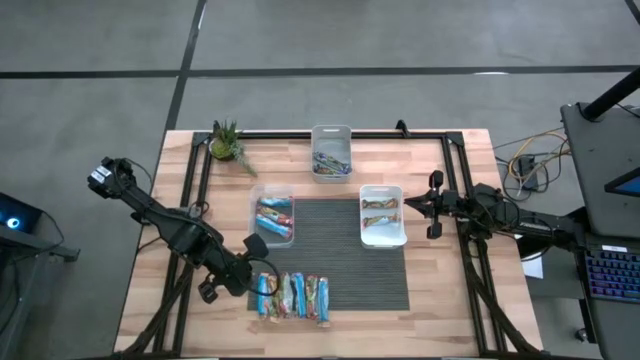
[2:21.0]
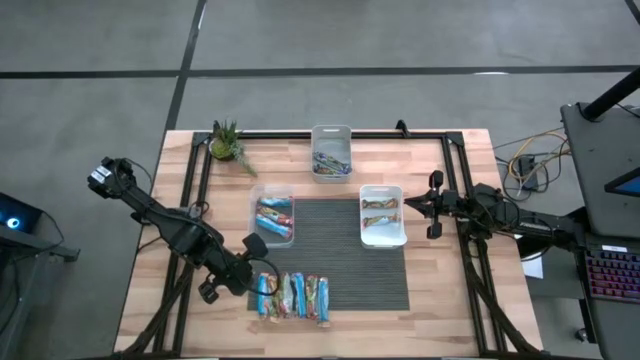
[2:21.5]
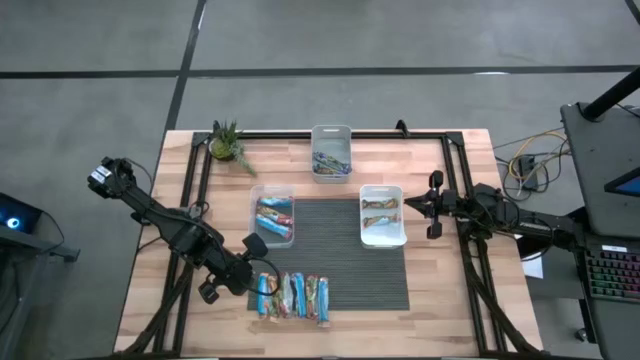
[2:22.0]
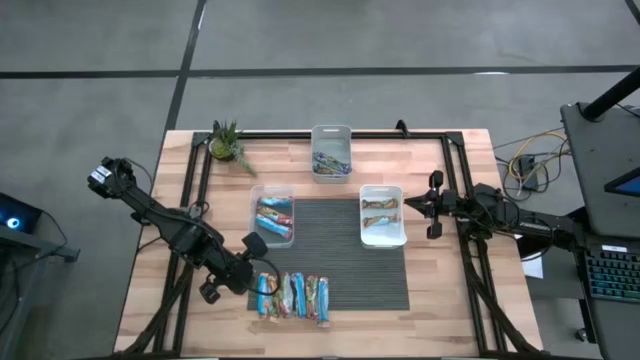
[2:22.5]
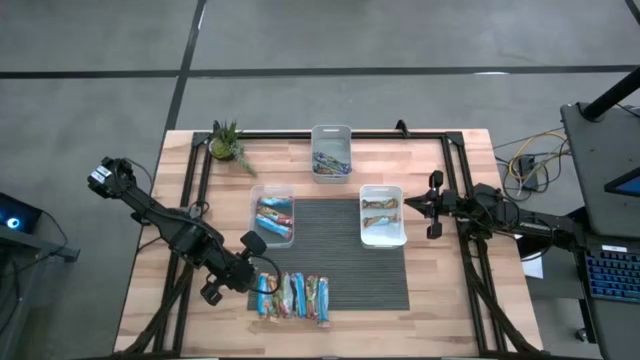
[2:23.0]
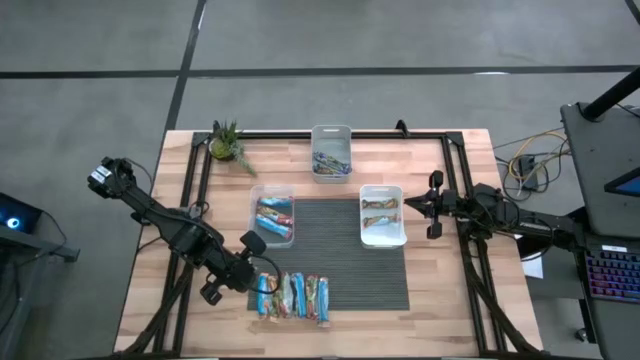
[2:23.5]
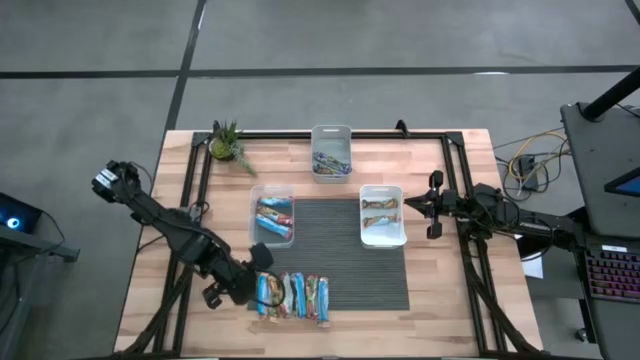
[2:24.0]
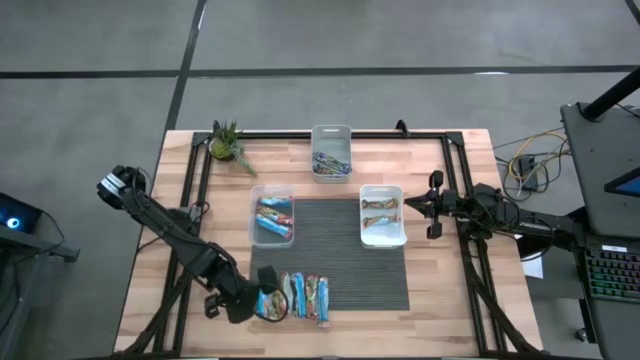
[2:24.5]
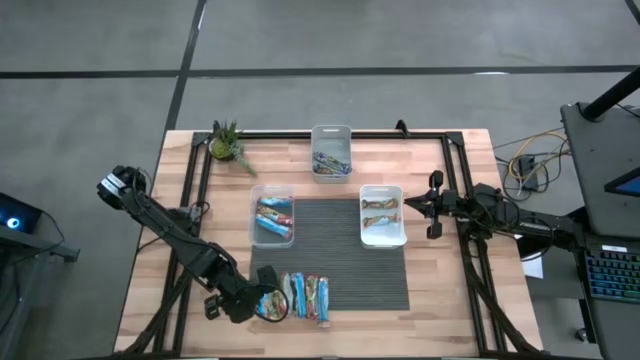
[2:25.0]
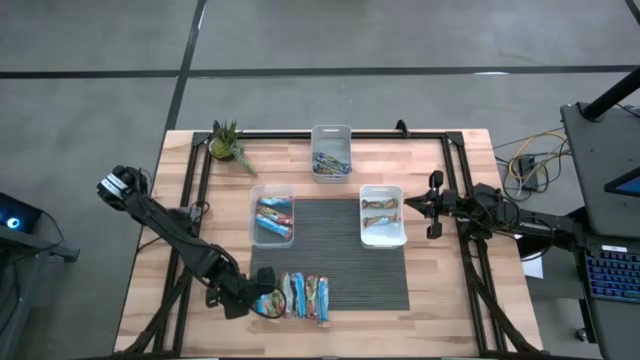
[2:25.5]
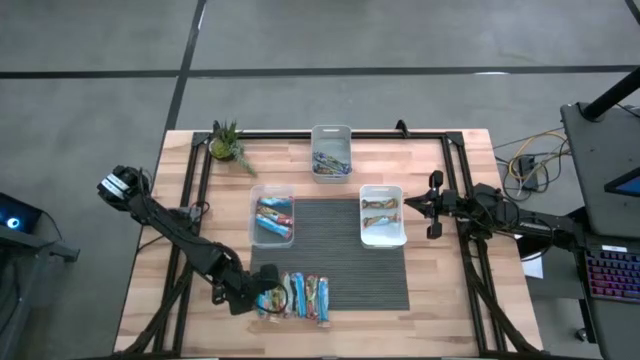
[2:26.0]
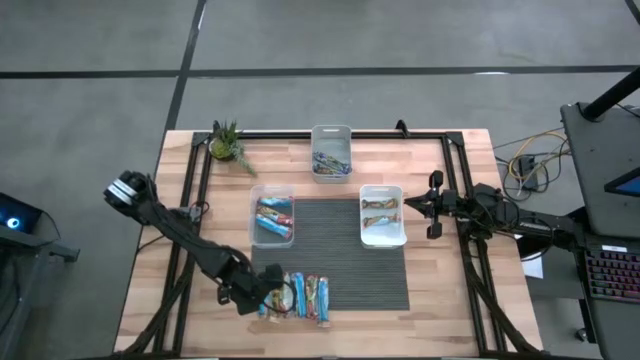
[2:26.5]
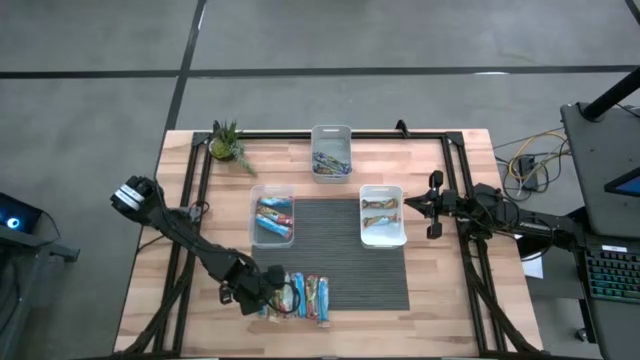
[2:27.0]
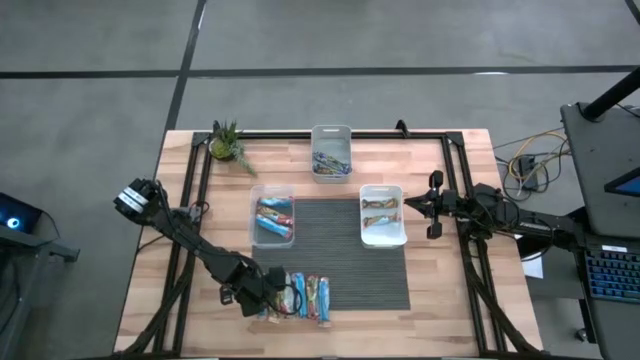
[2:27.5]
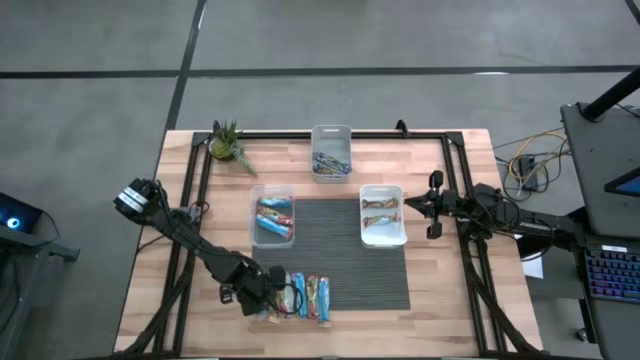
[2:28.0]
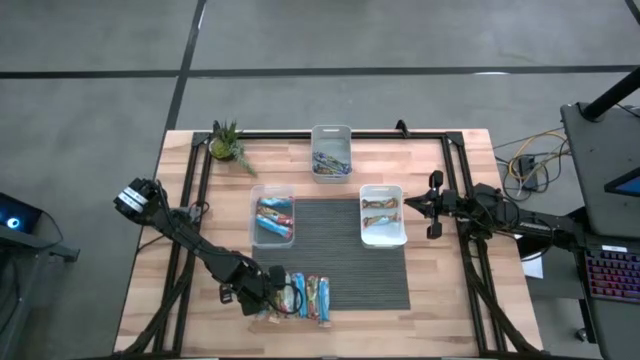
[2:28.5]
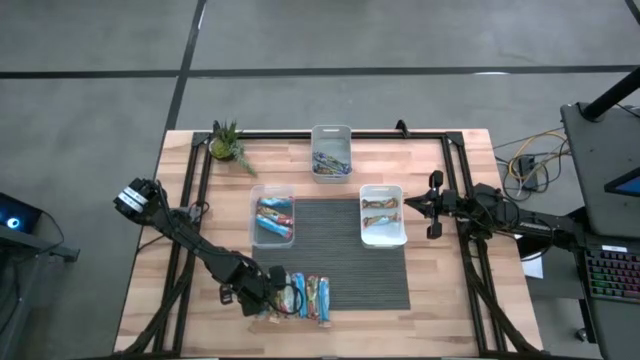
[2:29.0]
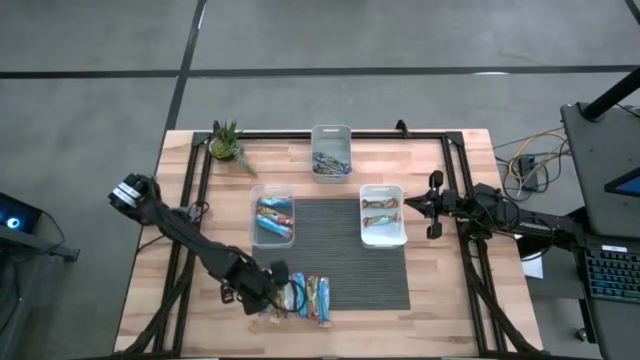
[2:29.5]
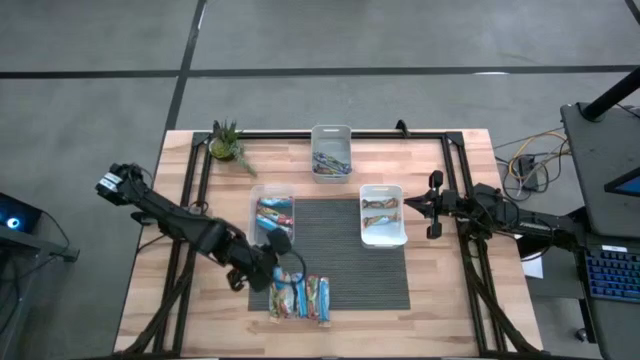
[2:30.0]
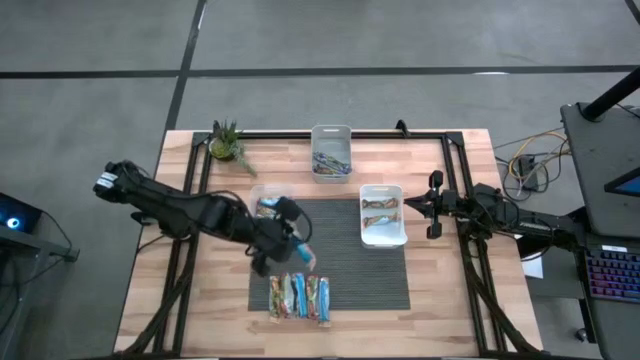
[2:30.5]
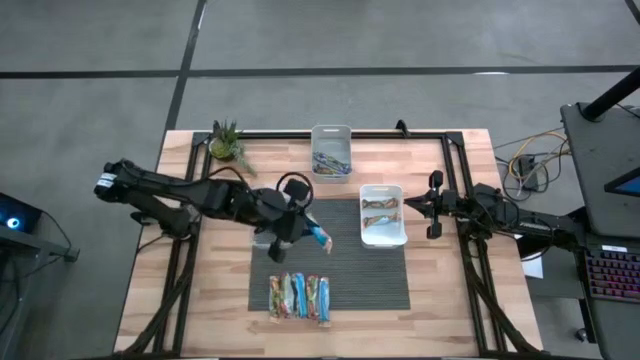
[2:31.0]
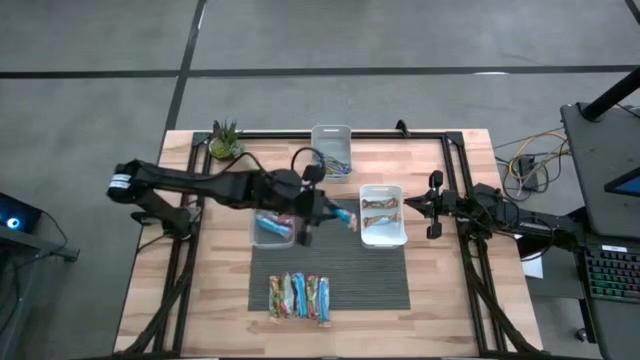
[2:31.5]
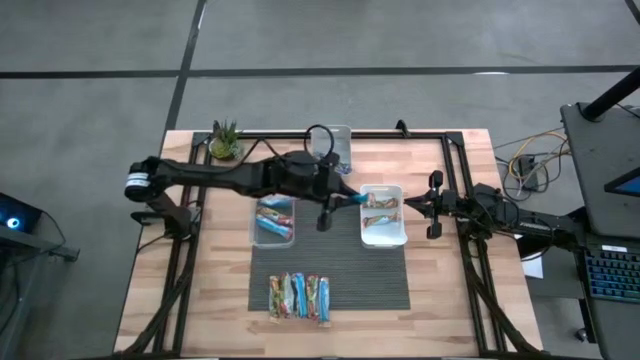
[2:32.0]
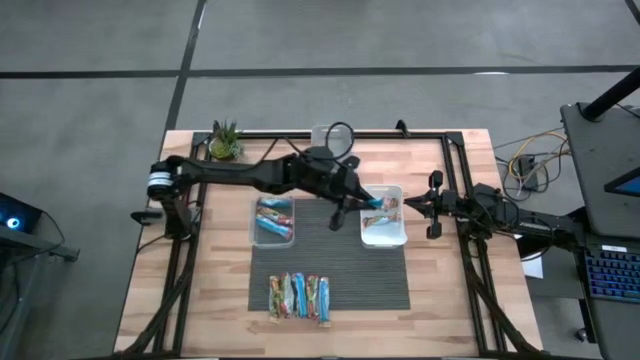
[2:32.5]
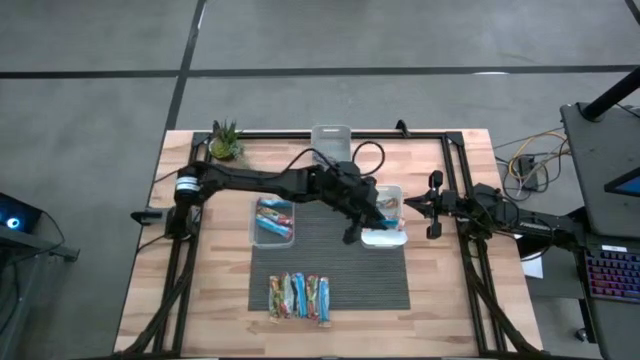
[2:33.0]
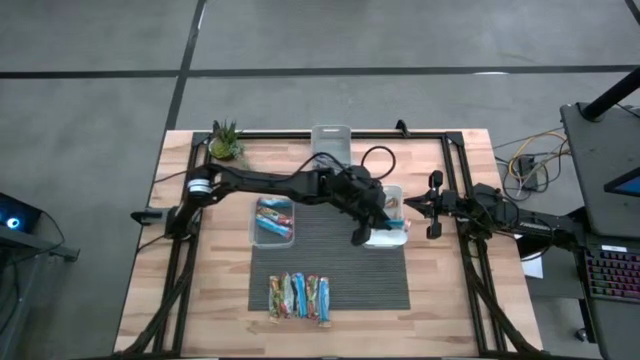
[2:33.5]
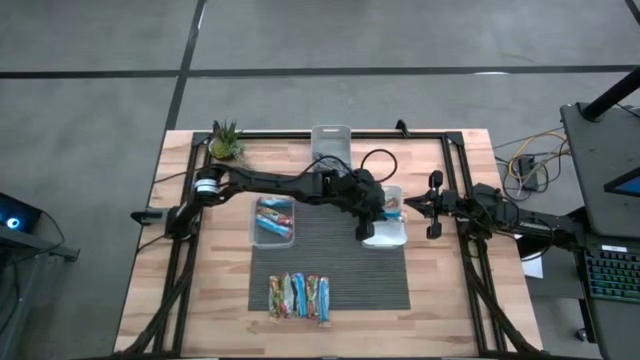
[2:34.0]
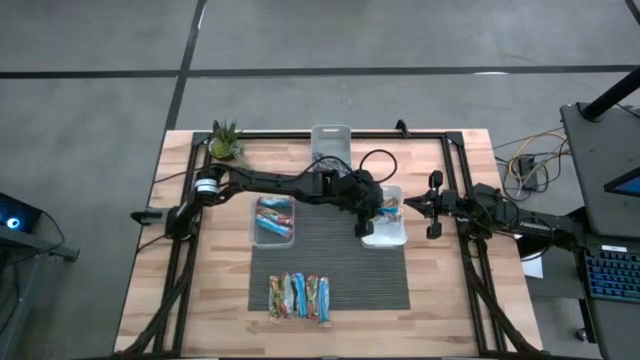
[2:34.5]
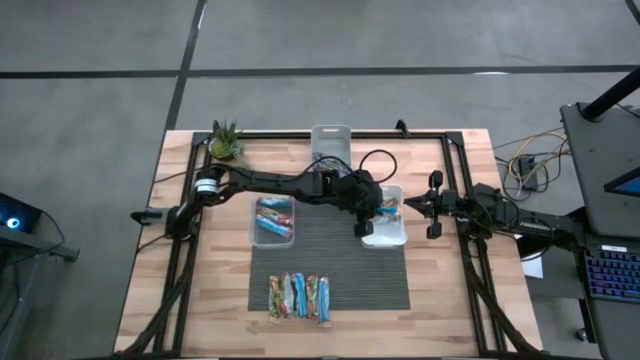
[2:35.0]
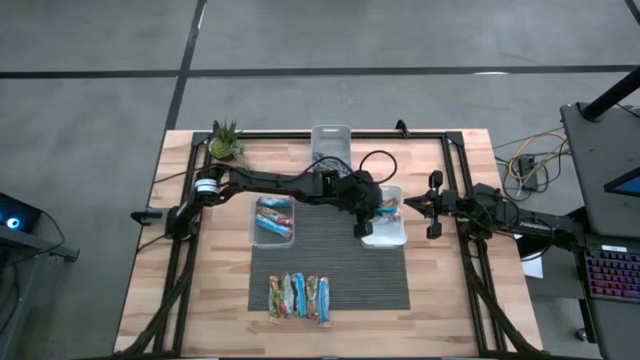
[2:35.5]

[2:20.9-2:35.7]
Task: Pick and place Granola Bars by type
Put the yellow granola bar into the white bin

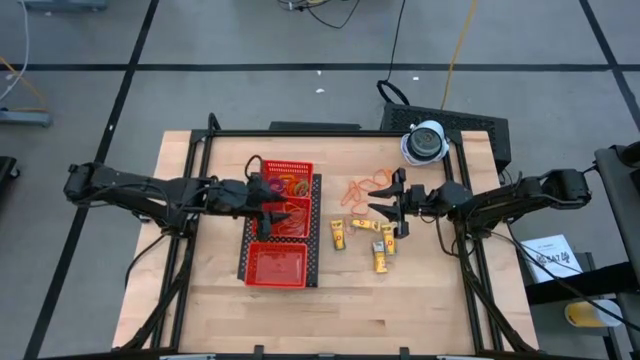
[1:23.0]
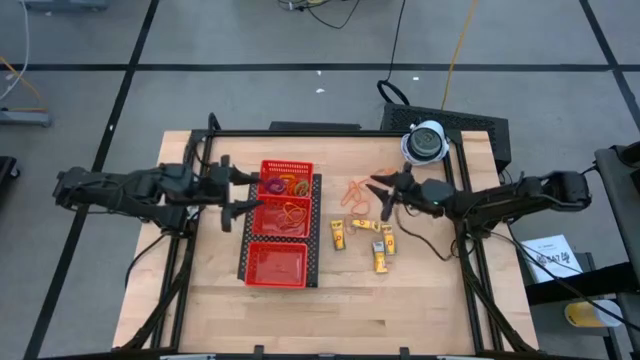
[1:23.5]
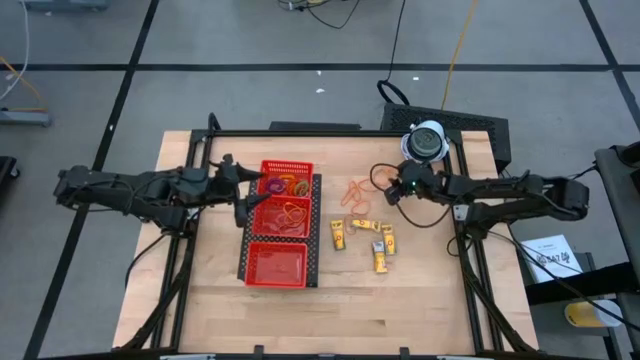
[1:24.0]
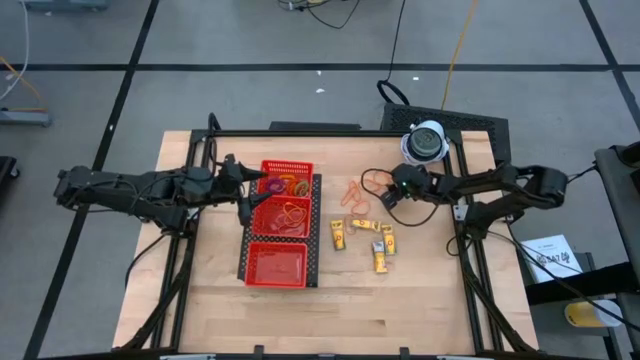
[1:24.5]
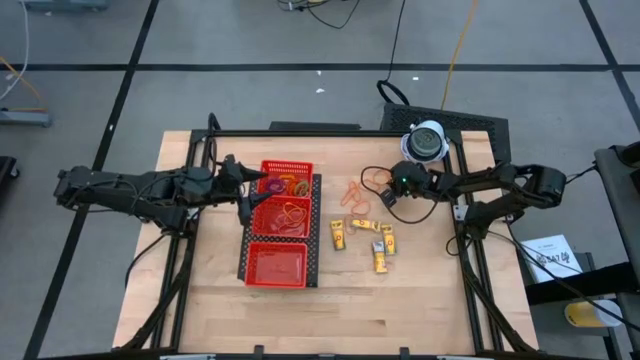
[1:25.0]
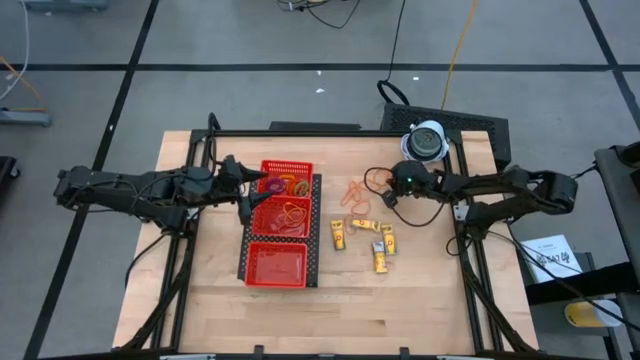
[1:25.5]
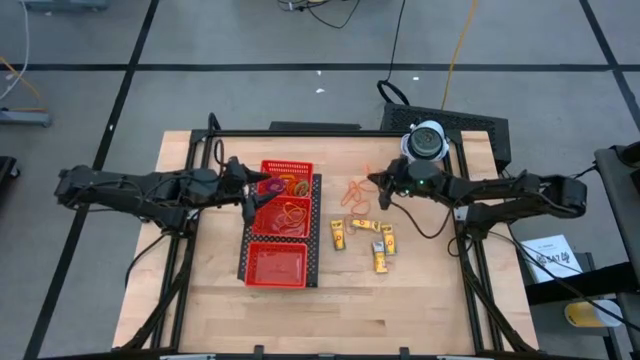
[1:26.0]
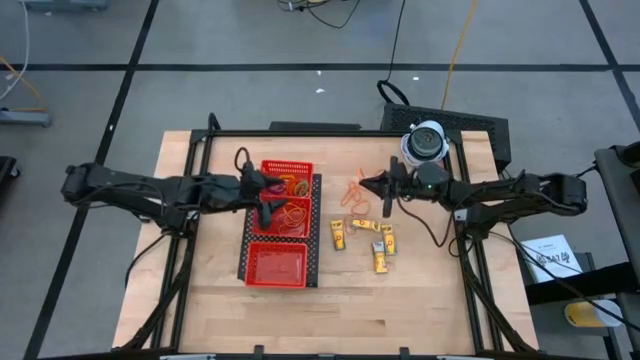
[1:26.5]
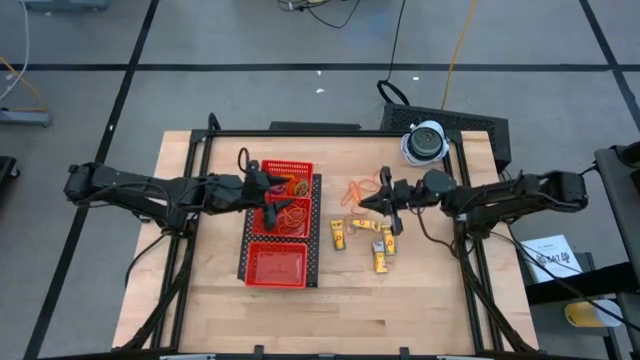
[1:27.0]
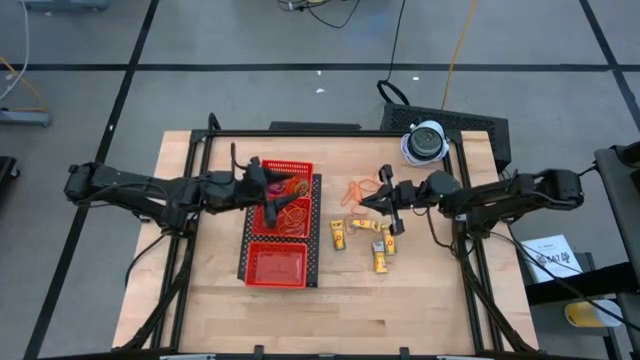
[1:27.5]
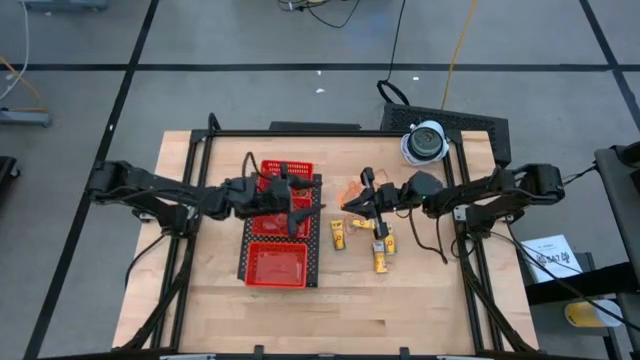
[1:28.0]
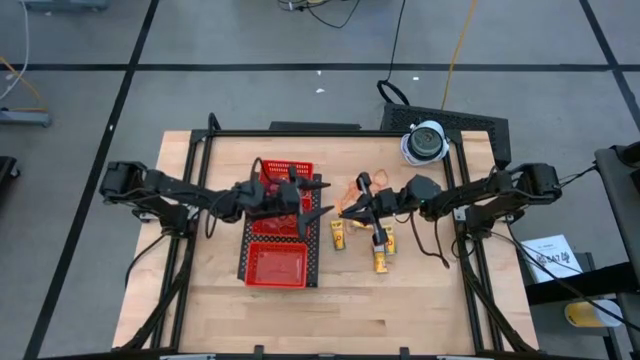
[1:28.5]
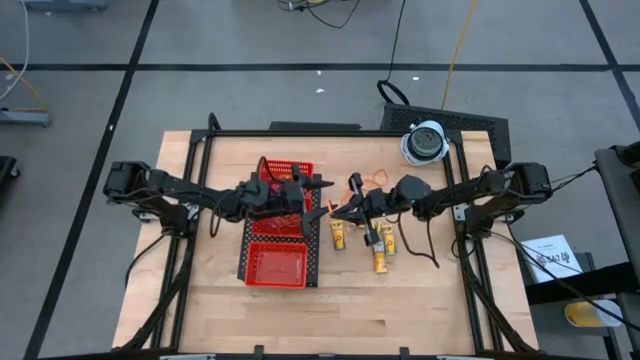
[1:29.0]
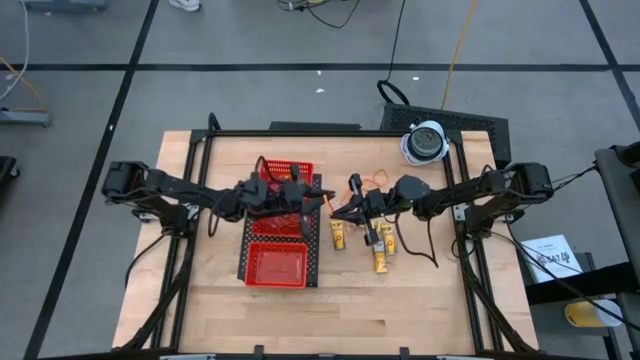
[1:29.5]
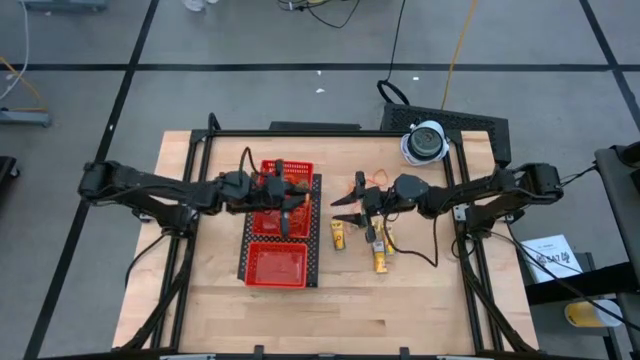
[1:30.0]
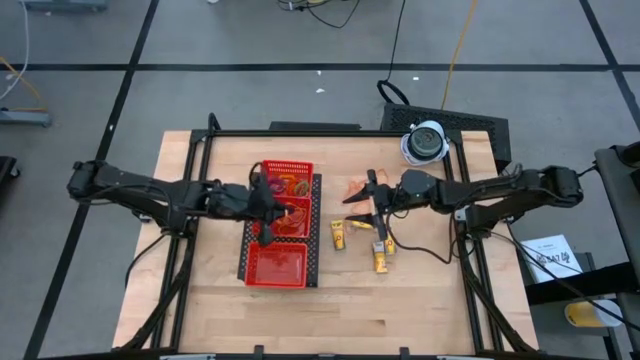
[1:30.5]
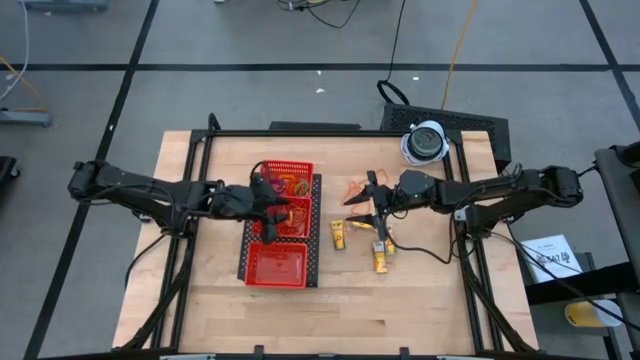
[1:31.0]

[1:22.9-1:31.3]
Task: Pick & Place Office Desk Supplies
Put the orange rubber band into the middle red basket on the shelf
